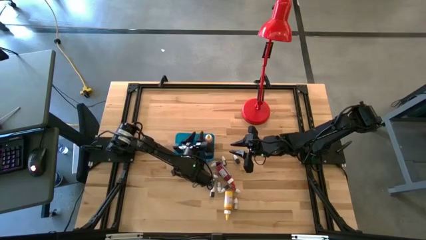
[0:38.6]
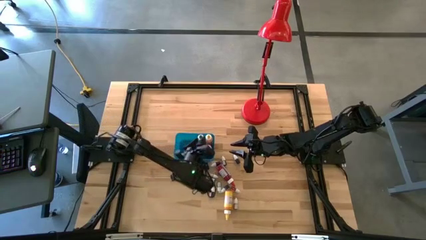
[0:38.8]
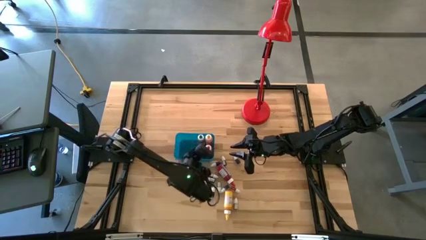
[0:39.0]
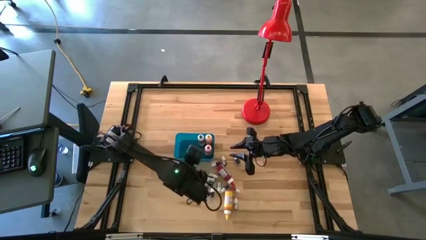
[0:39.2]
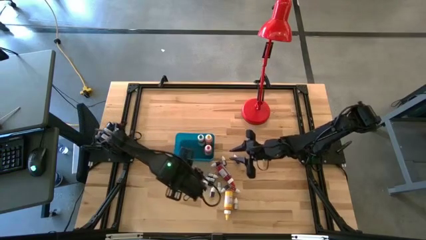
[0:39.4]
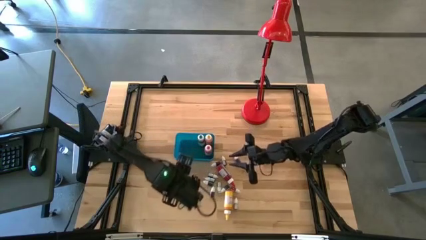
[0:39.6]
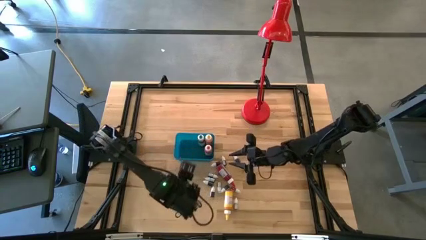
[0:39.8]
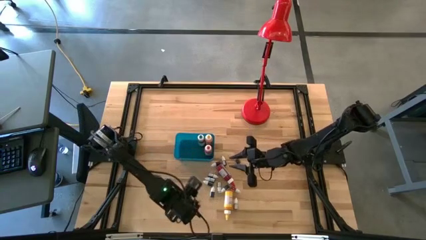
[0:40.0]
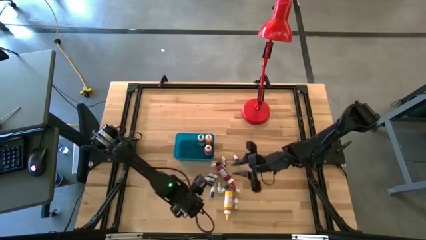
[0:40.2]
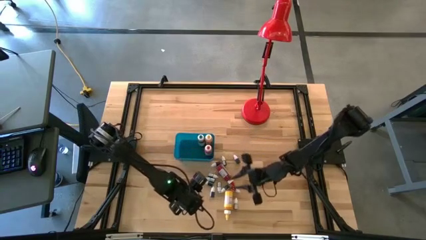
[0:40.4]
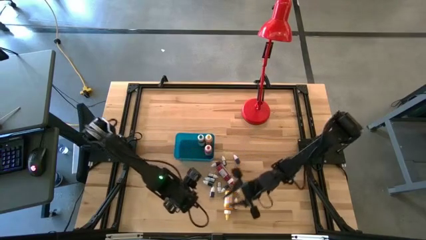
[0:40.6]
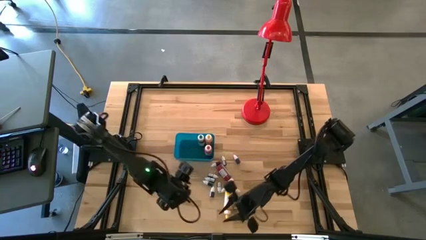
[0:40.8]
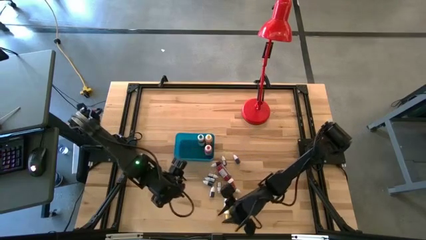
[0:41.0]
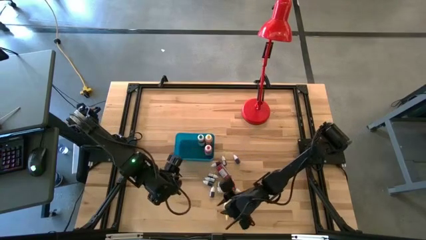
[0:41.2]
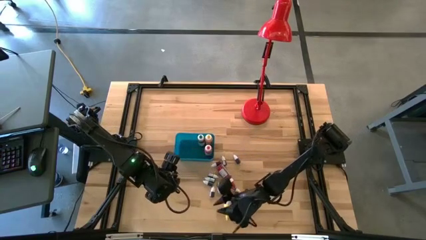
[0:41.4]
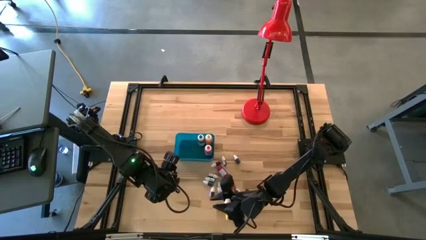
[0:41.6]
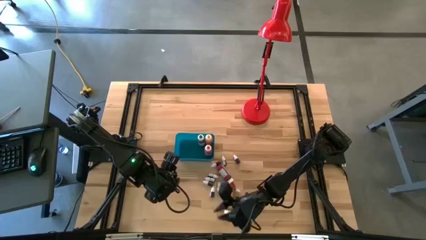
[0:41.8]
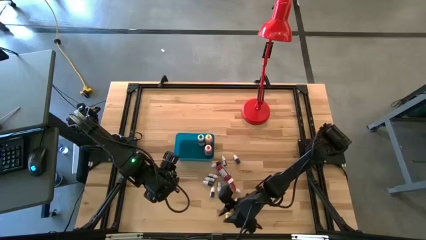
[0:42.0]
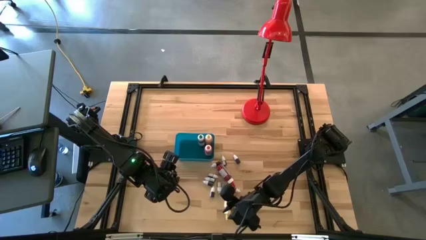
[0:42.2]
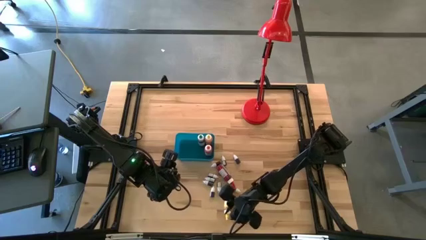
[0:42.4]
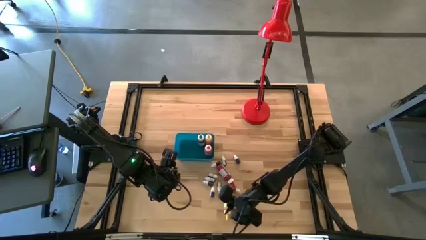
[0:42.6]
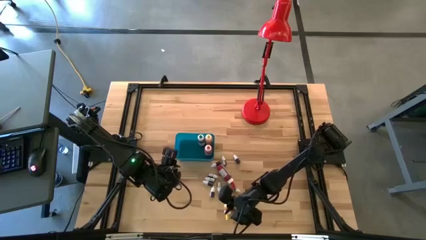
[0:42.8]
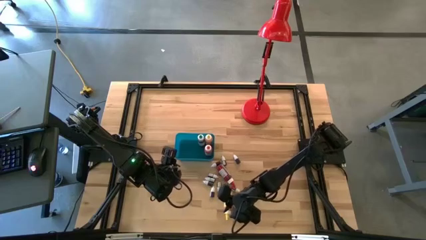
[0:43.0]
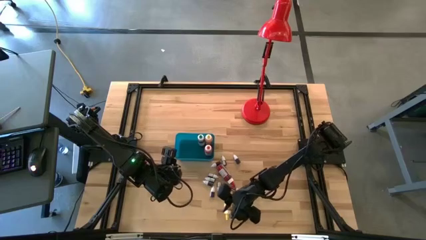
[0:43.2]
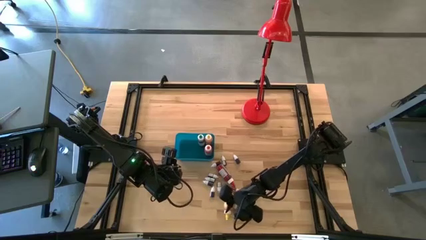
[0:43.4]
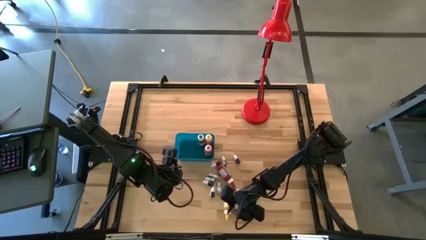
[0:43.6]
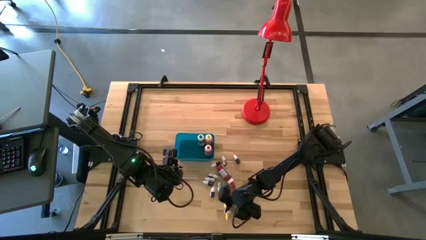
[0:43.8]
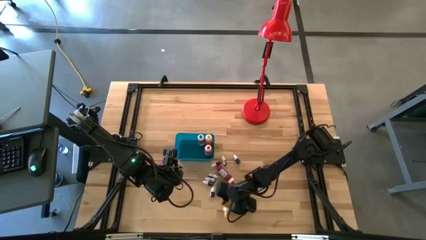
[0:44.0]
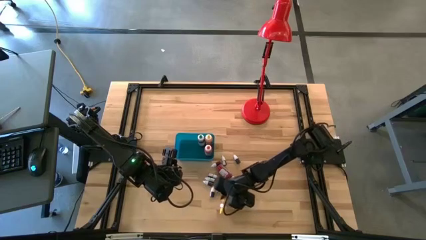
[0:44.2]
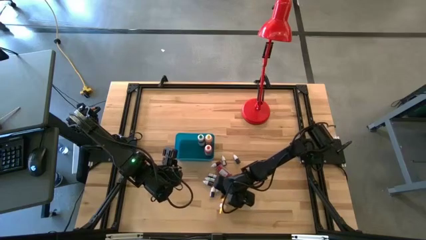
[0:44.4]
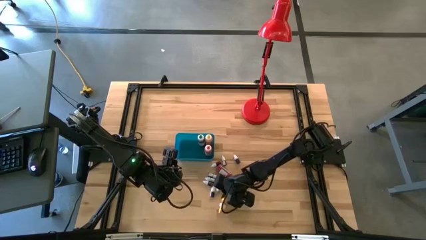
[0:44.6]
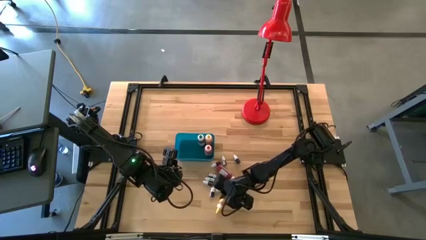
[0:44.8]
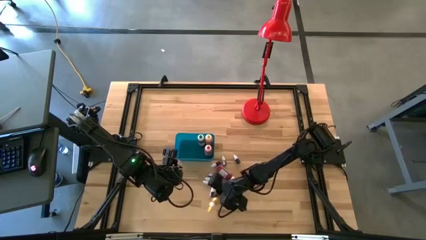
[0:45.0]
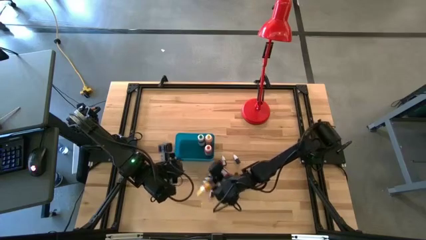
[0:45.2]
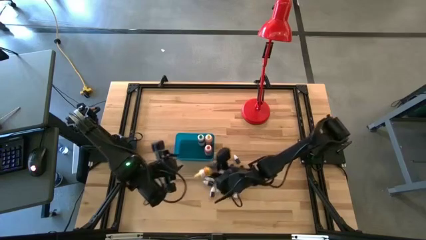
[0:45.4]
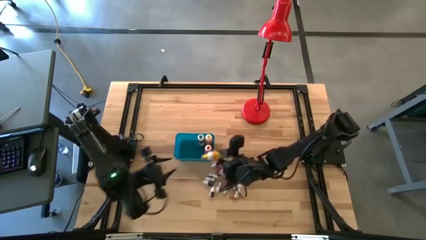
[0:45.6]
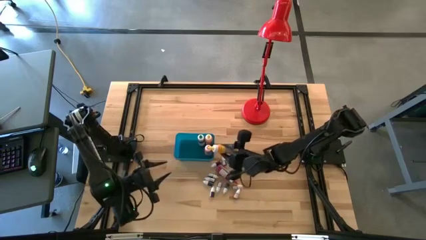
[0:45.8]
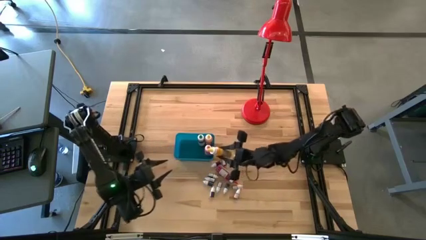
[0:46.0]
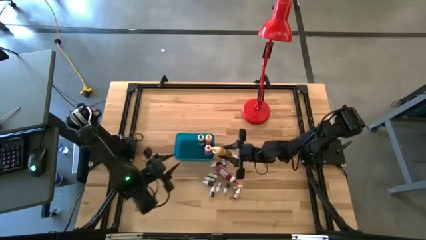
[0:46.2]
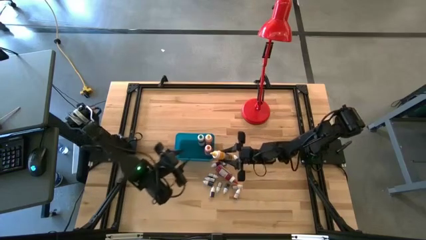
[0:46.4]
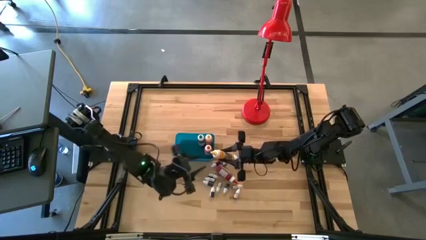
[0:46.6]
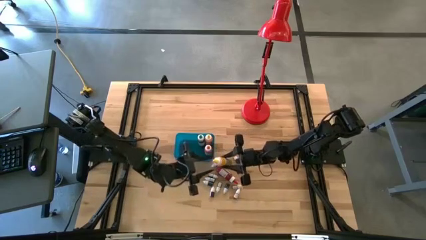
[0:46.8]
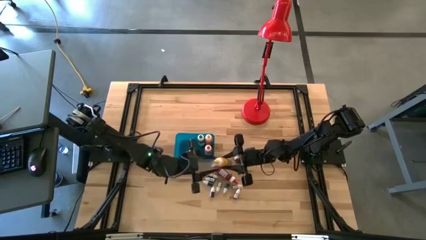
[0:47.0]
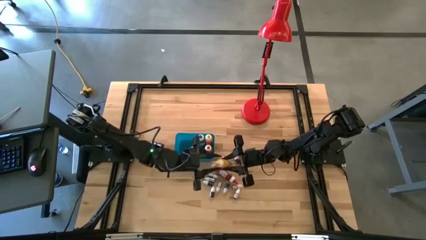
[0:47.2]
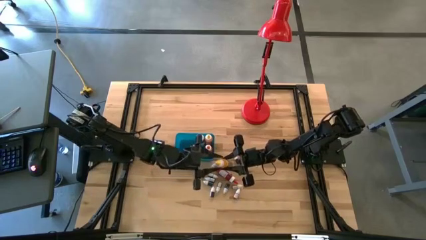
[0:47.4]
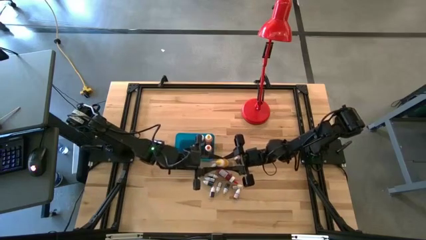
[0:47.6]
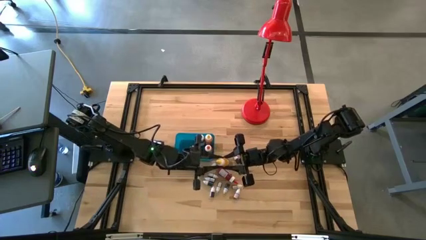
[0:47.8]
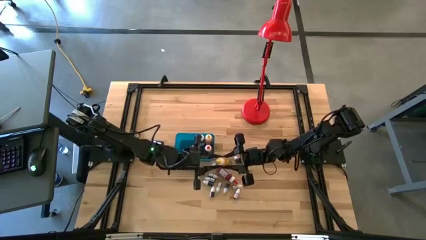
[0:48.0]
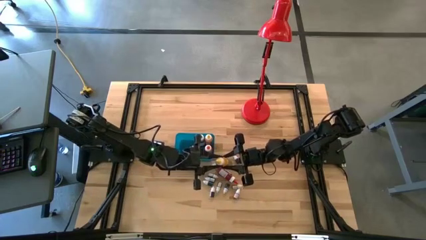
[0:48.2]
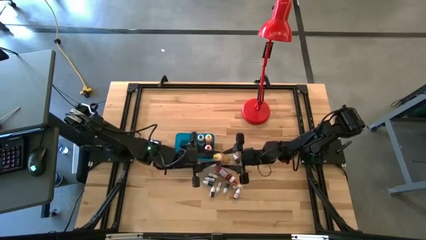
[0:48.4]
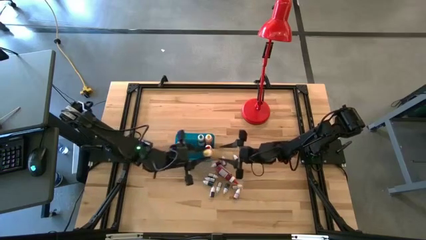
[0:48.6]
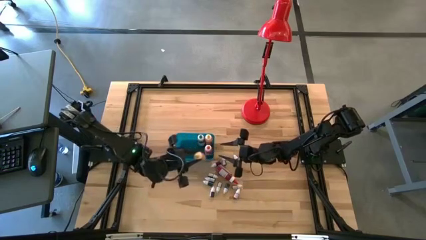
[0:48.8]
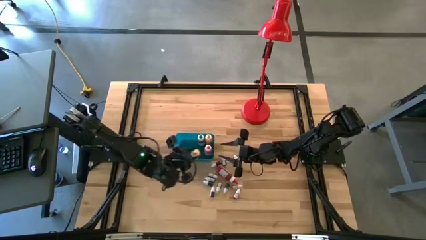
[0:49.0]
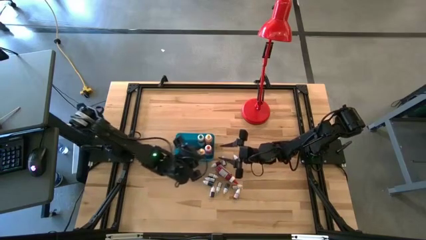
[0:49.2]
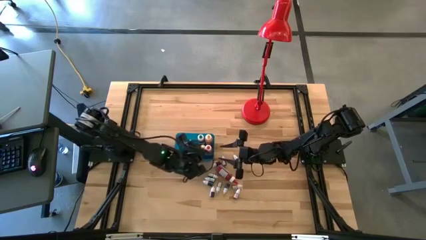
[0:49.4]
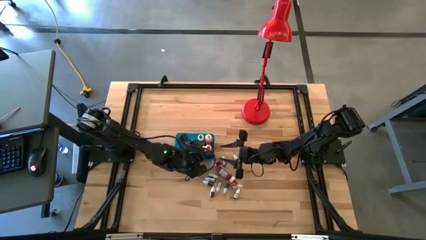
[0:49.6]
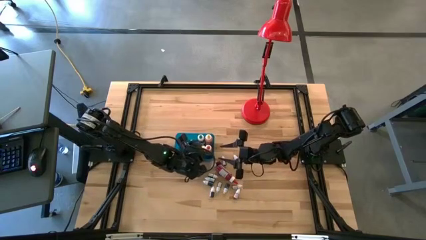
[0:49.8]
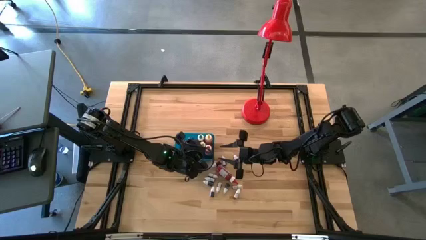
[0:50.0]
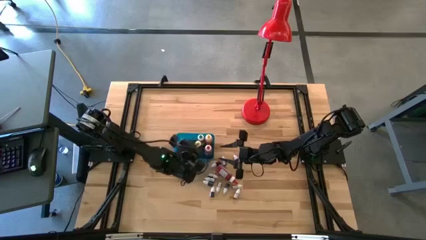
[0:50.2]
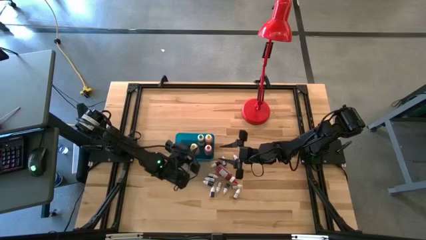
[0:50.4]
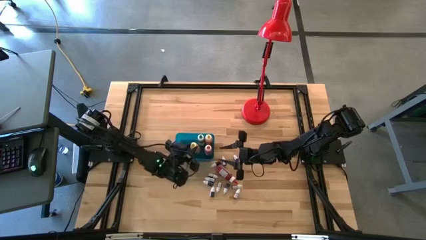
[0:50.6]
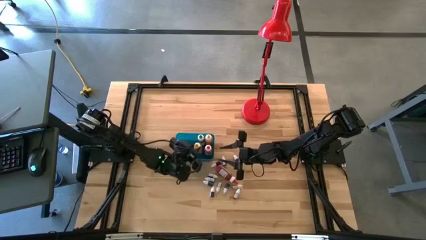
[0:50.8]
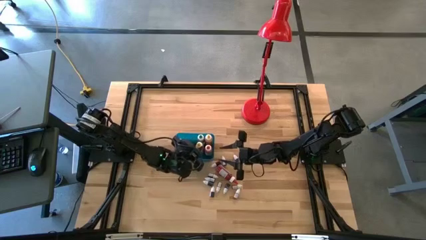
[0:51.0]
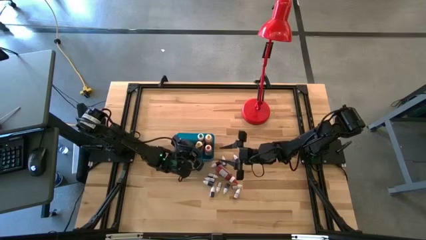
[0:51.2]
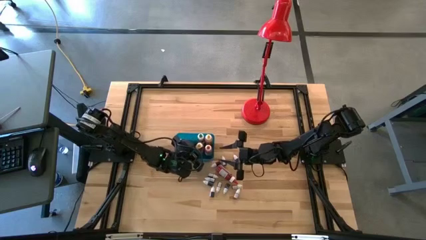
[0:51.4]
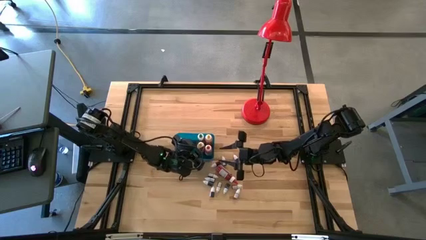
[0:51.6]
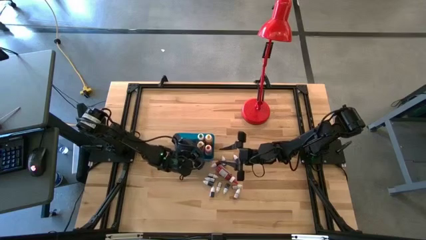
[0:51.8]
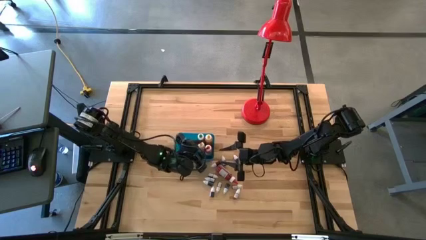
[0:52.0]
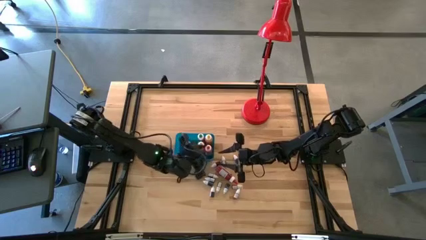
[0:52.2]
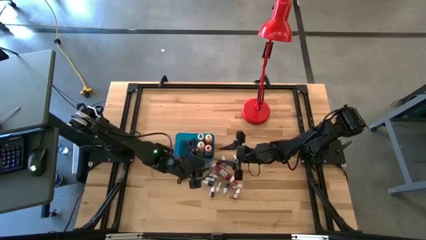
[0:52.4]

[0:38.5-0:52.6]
Task: Pick & Place food coloring
Put the large yellow food coloring into the blue bin

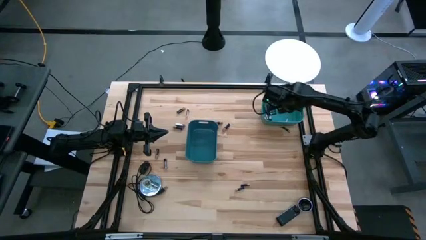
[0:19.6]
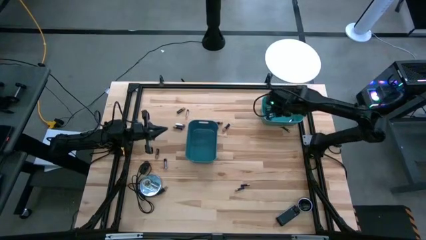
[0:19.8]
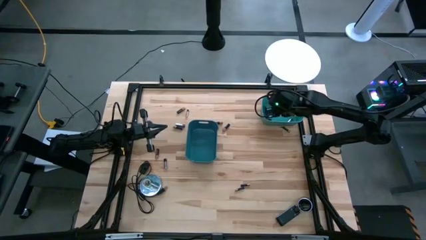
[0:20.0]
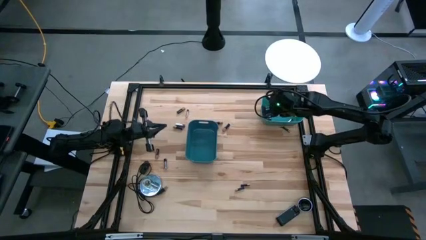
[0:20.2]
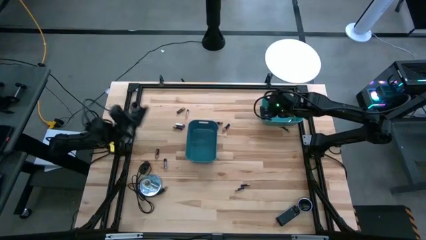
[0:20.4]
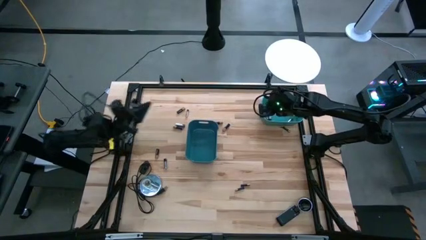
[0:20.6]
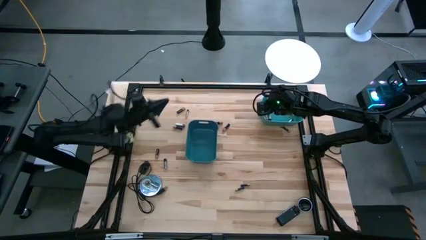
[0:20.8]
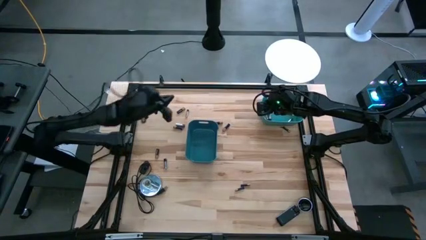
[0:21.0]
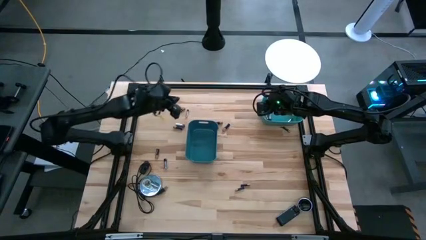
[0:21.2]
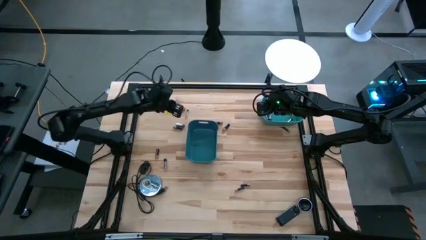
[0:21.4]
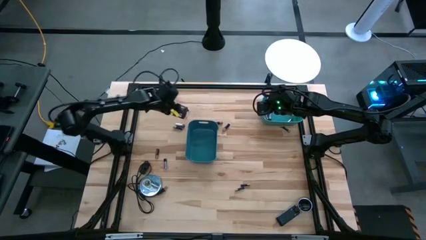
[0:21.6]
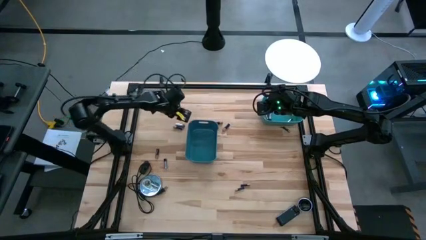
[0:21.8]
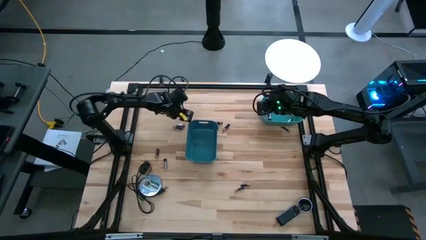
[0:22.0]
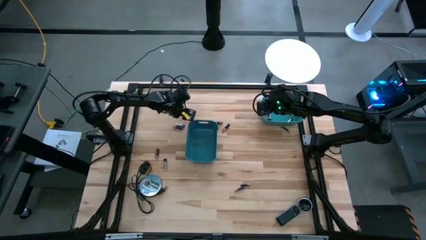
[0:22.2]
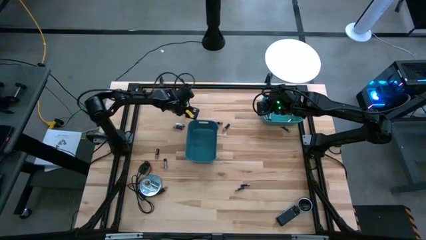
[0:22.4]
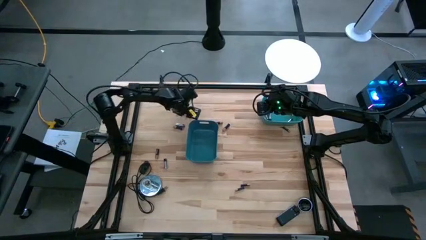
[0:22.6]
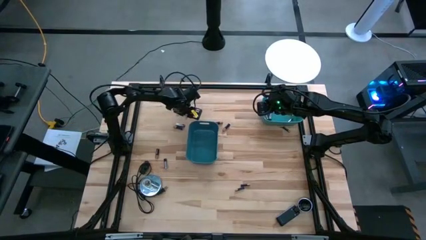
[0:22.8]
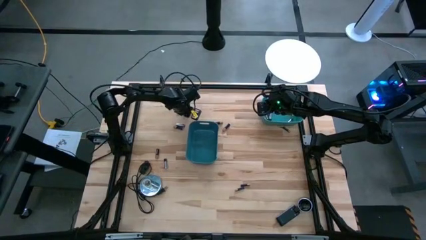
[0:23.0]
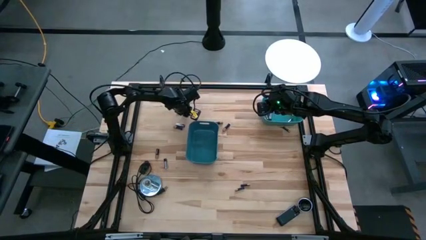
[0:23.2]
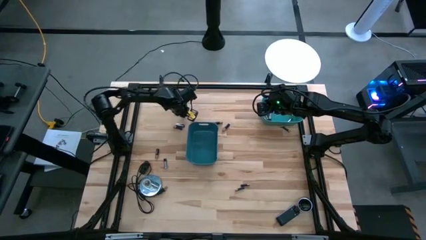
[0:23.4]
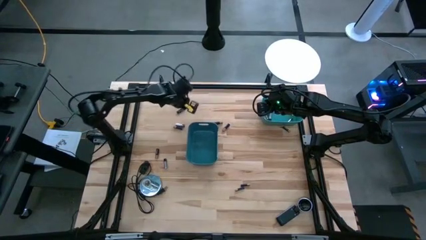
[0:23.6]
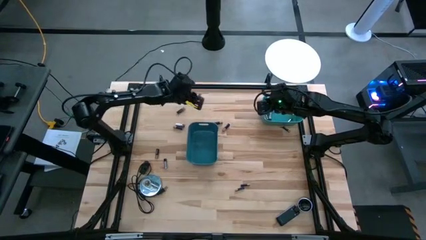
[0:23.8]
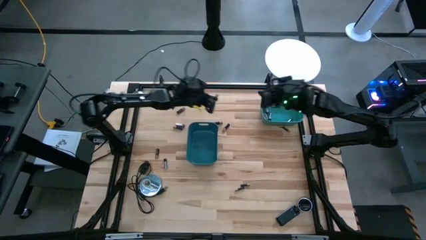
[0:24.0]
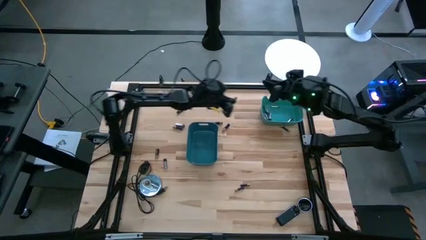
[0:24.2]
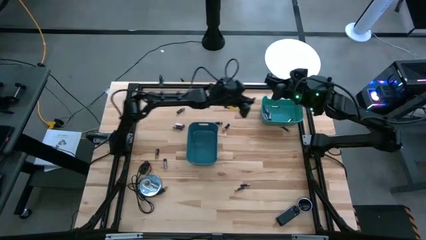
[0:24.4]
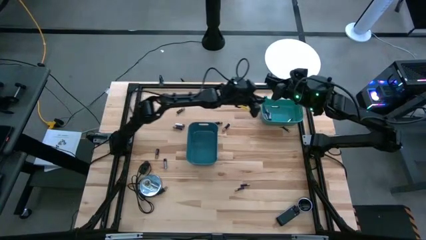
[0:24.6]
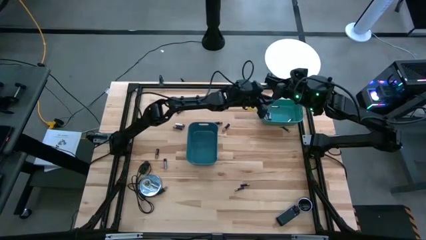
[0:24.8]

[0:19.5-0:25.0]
Task: Sort batteries
Put the silver battery into the green bin
